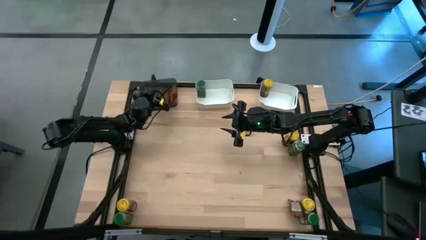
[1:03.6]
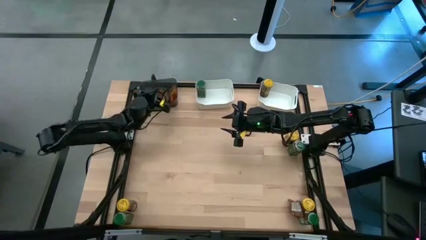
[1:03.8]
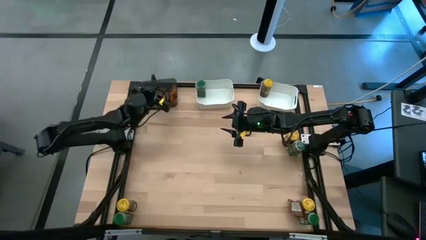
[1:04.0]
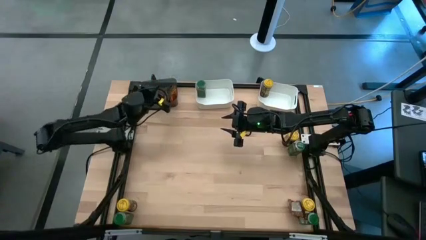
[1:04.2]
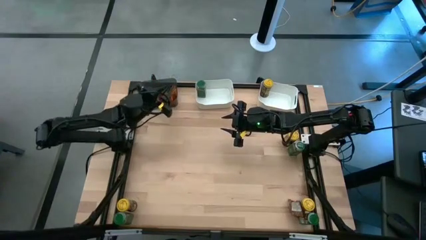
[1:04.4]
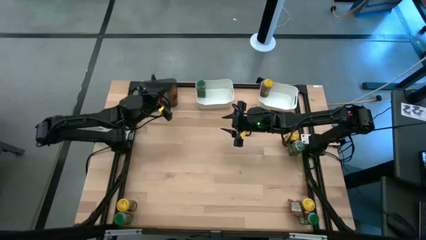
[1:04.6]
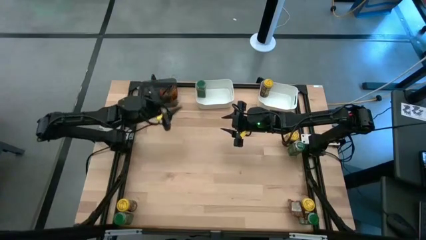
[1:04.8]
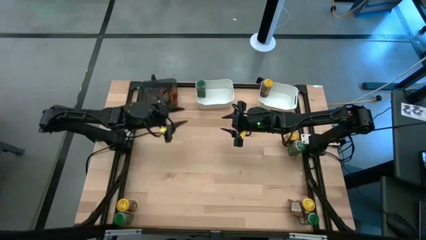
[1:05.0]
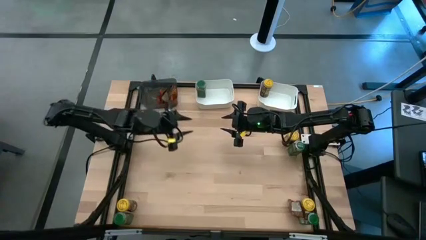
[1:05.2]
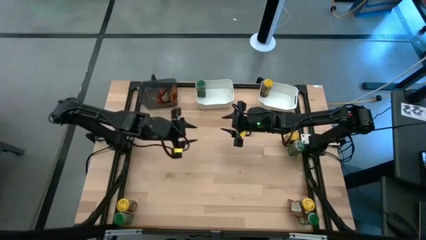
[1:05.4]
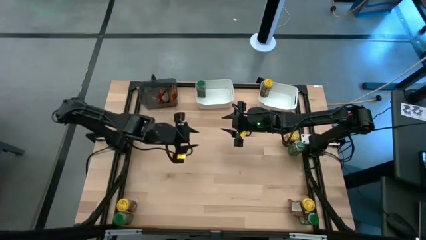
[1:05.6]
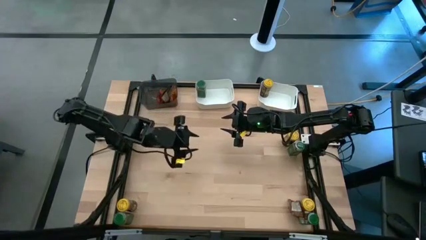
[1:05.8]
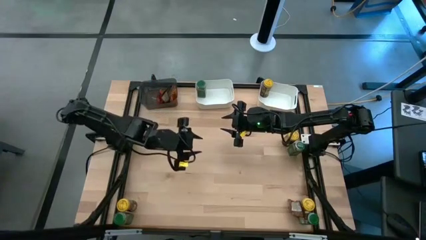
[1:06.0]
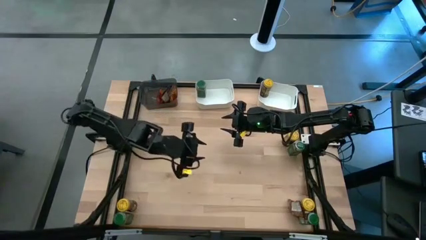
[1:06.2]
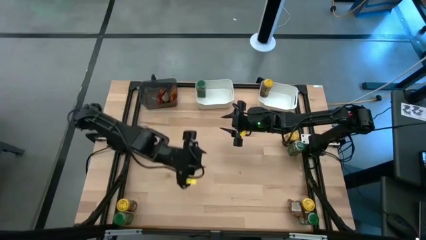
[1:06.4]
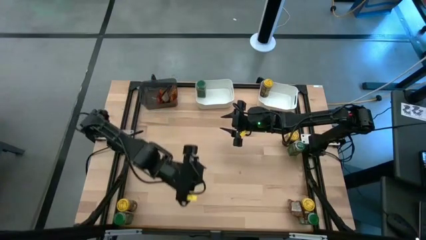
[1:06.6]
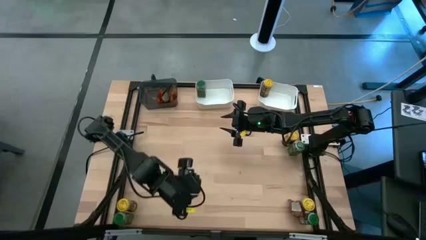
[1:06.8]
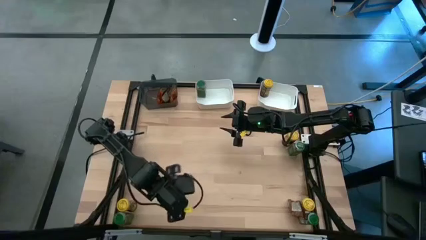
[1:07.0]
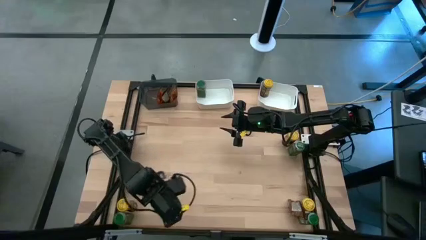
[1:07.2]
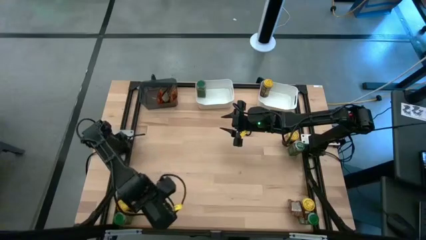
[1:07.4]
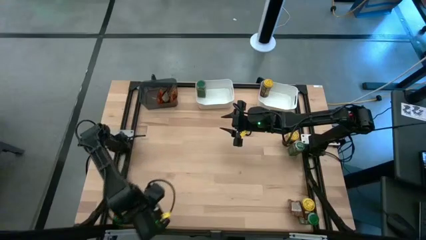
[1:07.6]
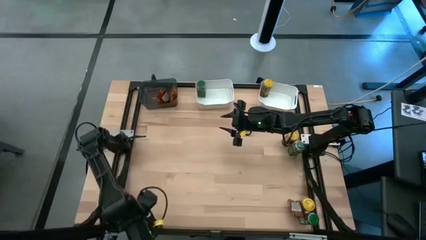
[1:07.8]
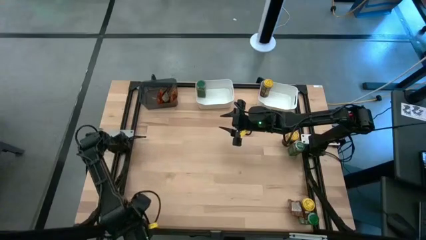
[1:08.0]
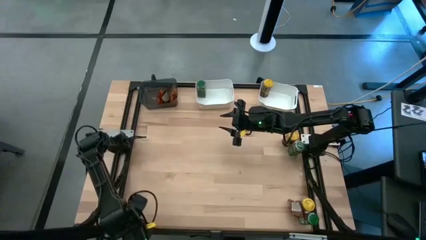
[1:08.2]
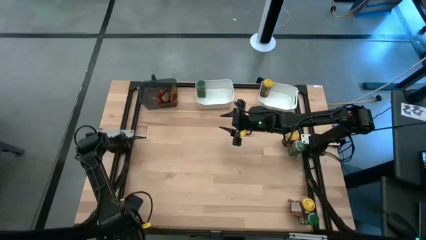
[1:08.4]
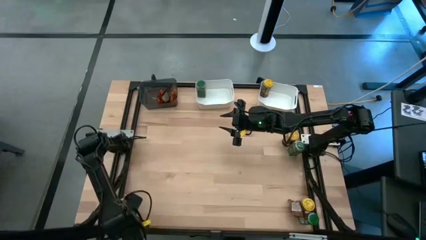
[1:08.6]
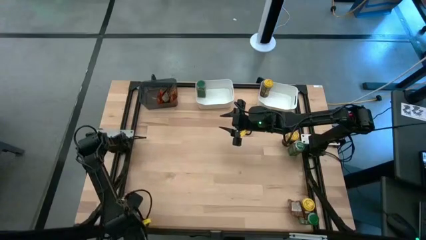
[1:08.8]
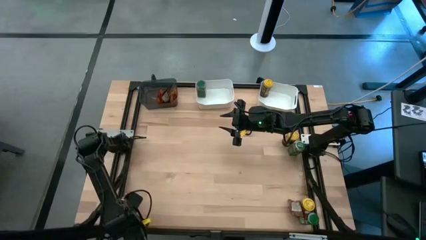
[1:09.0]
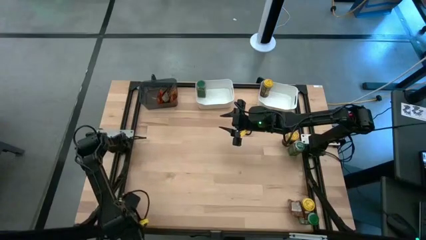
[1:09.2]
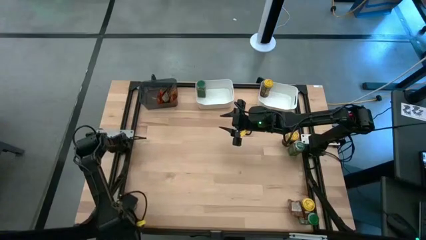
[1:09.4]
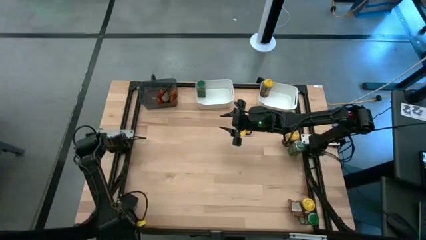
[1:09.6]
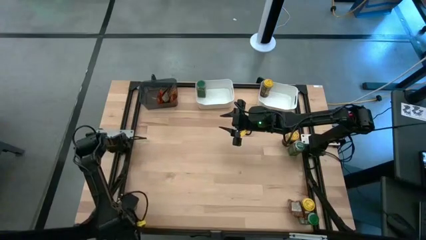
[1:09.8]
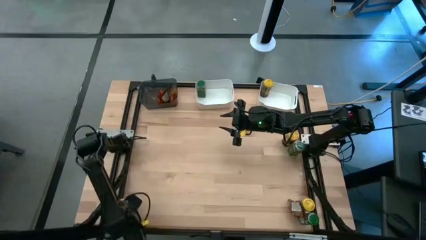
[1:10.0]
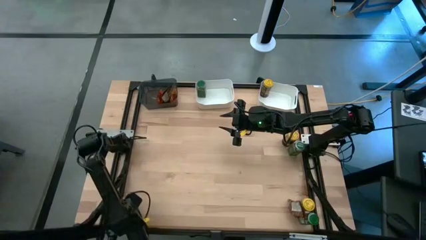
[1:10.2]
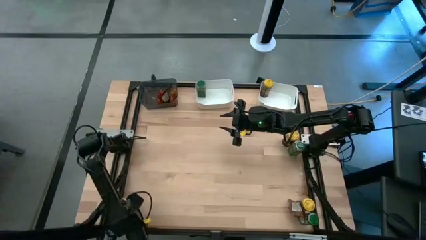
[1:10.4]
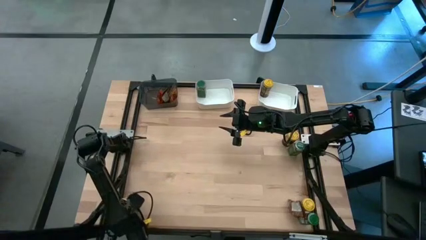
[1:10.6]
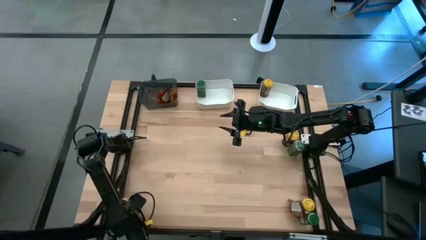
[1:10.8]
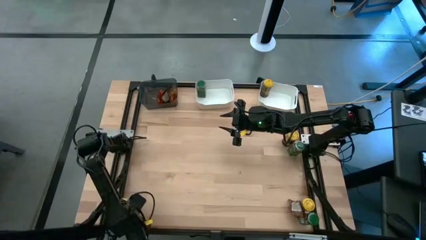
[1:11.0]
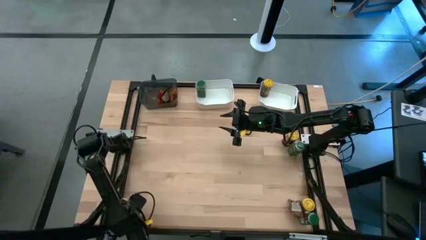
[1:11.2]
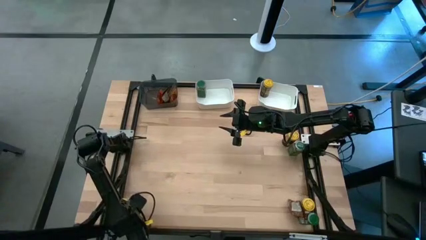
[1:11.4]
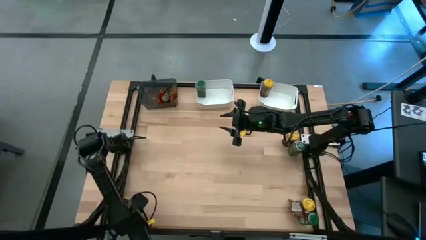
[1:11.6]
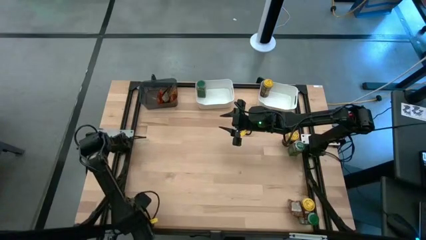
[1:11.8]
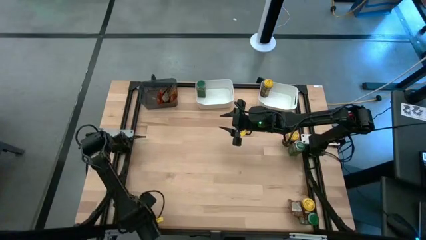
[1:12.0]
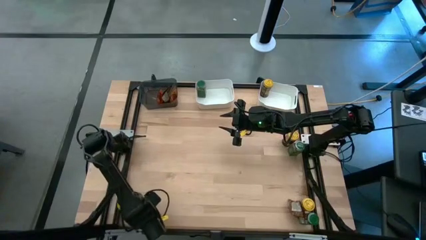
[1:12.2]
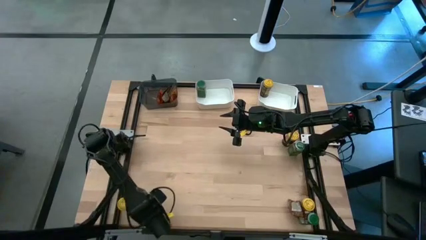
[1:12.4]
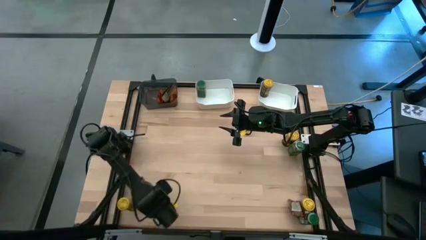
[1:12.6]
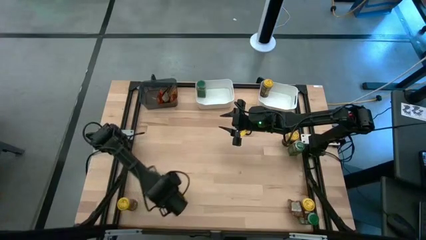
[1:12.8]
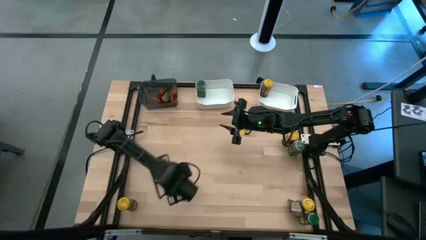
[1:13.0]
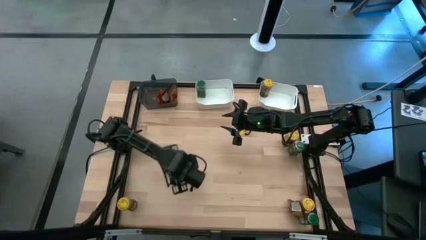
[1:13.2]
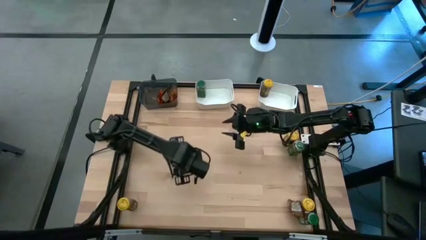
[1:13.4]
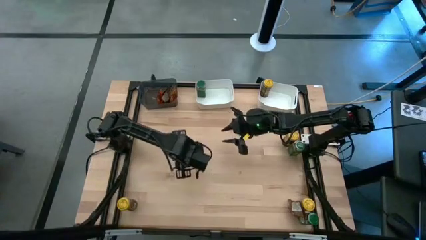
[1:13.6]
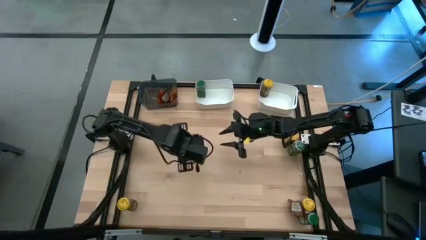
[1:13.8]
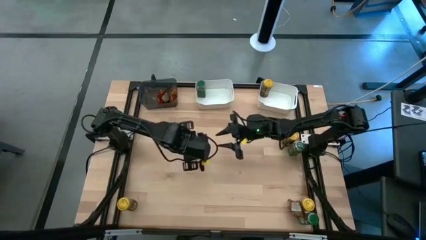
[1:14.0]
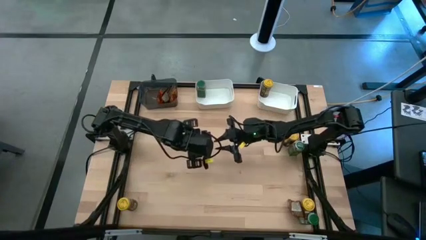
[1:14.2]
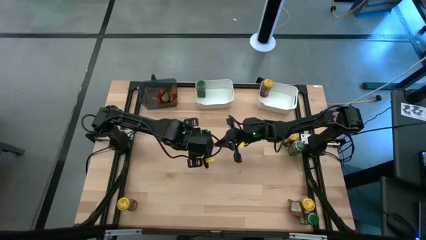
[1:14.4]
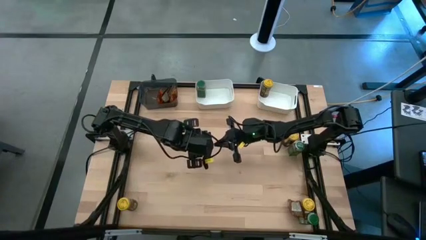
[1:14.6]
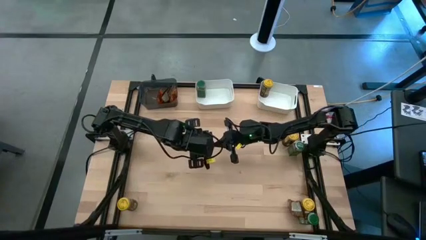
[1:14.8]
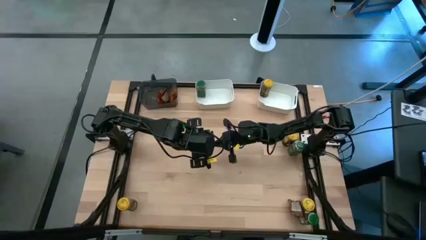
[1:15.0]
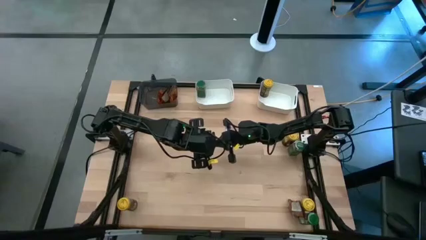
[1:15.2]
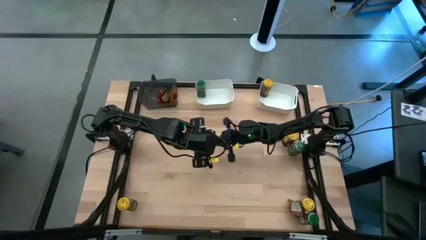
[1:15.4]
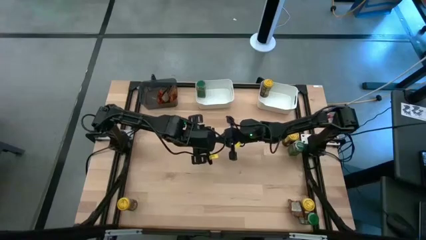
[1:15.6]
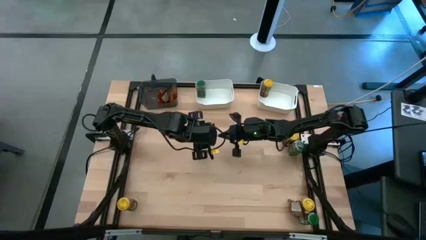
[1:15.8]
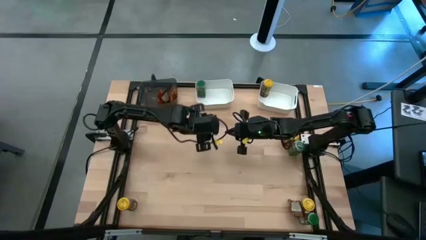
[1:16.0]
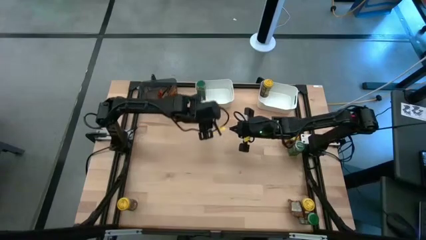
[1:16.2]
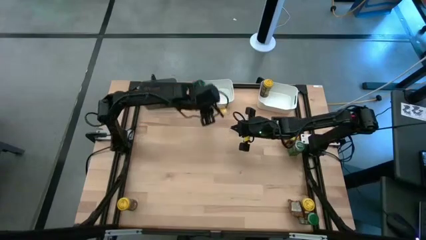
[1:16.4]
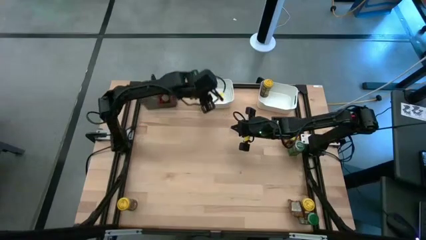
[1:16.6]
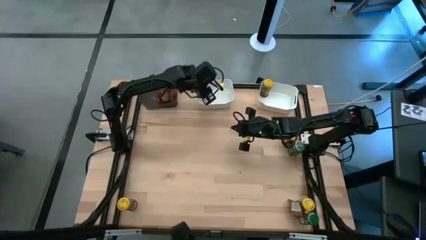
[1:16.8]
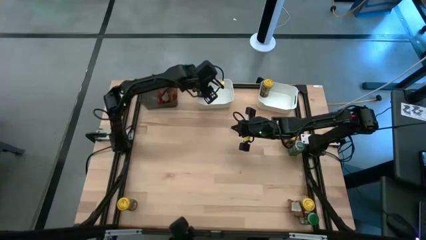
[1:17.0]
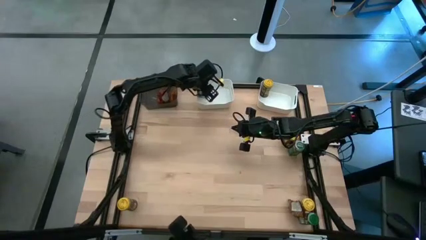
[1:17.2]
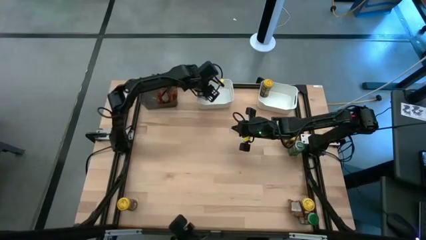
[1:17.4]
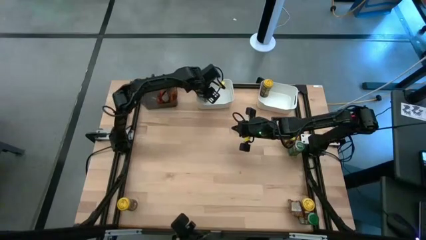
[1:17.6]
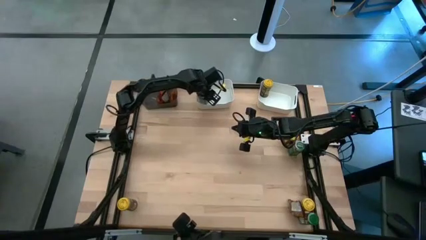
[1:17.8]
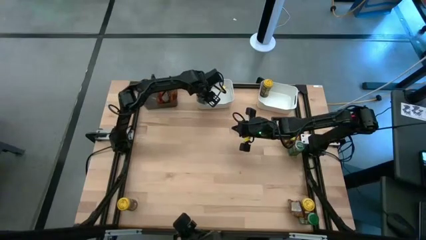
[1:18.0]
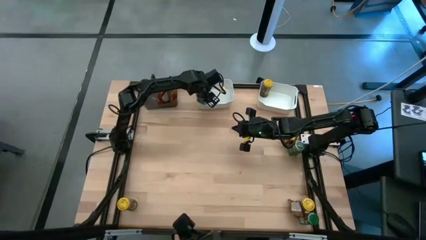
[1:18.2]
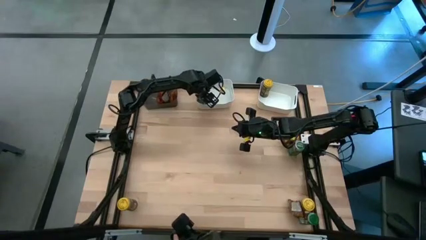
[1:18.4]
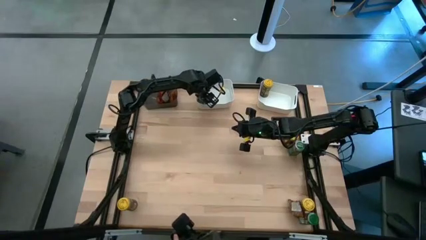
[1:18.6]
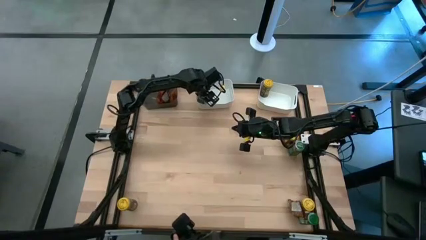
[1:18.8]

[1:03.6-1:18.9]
Task: Sort spices by type
Put the bottom left green seasoning bottle into the left white bin

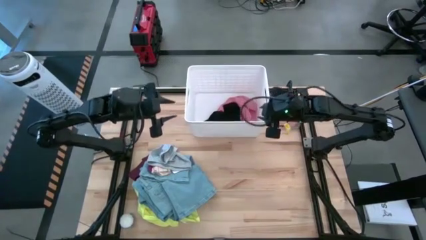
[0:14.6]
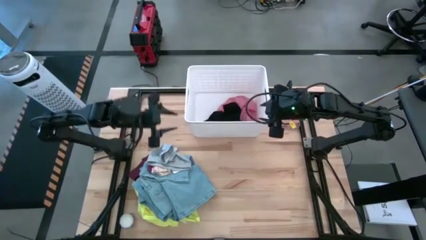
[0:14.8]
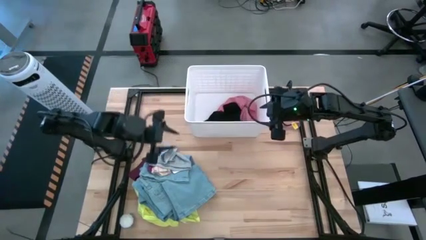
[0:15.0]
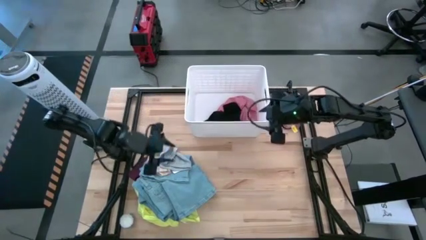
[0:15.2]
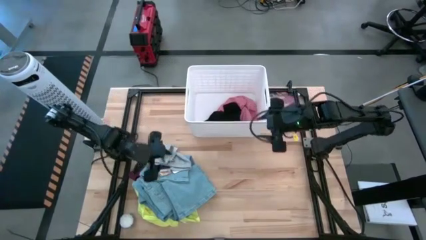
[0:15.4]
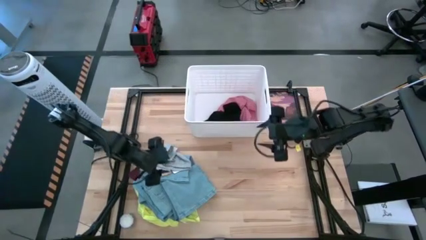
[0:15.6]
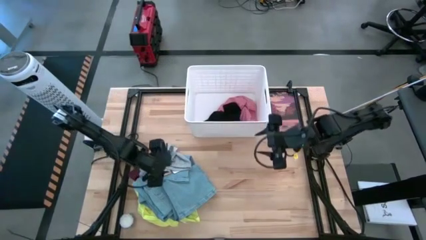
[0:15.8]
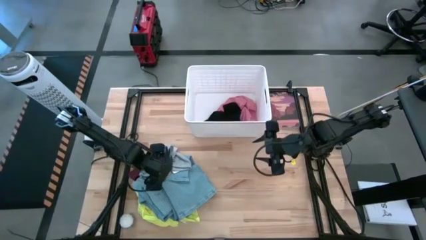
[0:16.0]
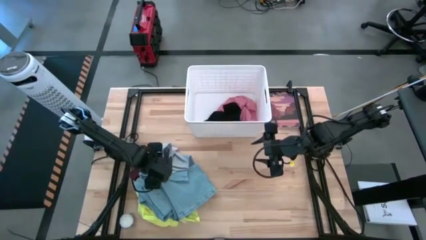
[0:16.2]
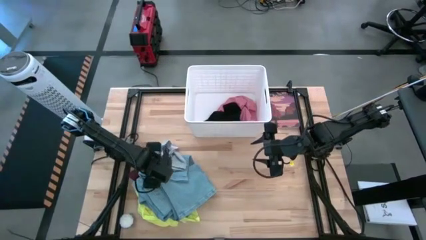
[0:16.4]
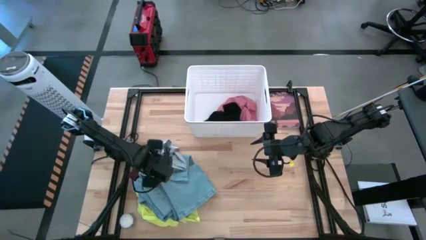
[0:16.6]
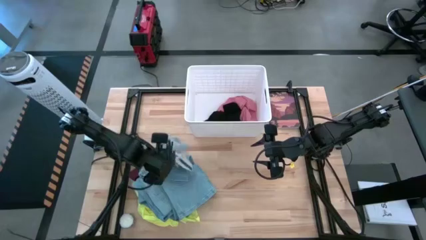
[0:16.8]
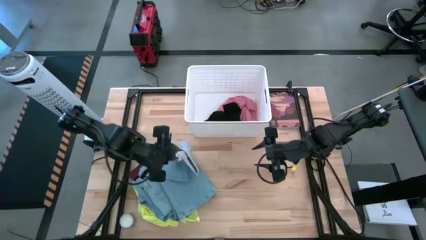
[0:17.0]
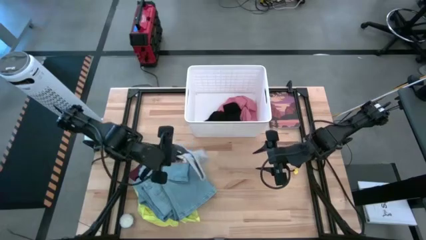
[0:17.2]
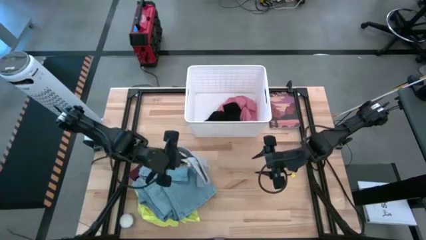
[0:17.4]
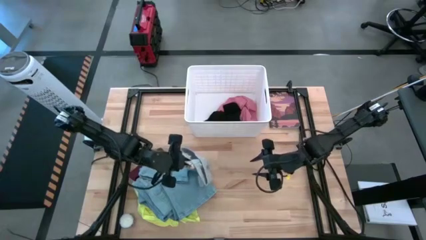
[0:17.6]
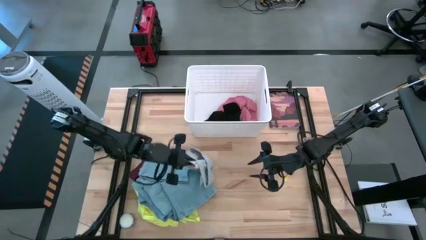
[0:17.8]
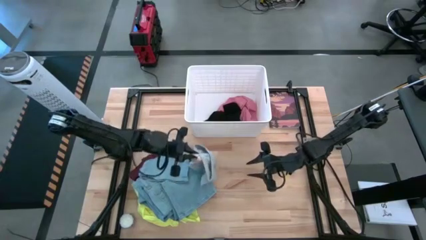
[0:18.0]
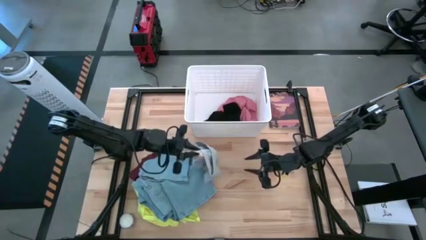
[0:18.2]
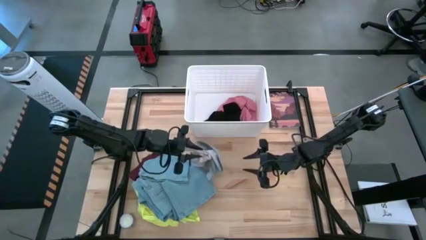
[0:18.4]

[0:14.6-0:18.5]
Task: Sort clothes
Put the gray sock into the white laundry bin
